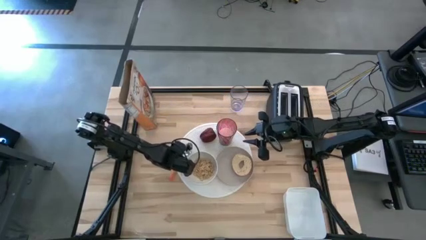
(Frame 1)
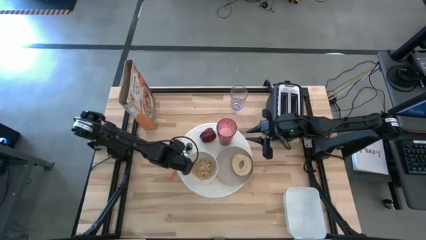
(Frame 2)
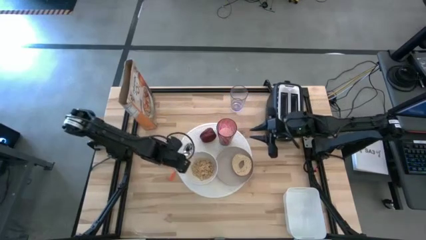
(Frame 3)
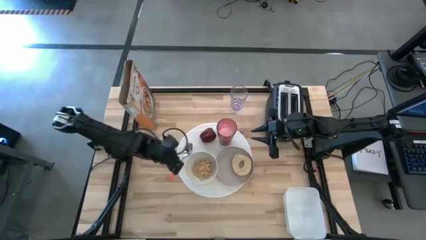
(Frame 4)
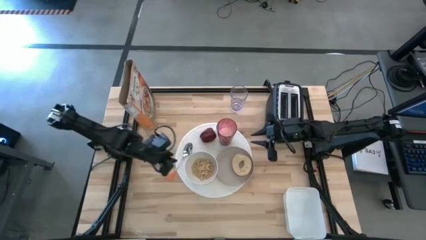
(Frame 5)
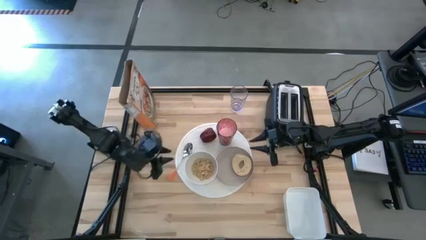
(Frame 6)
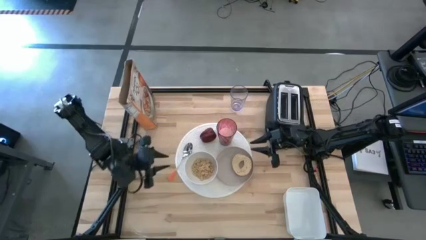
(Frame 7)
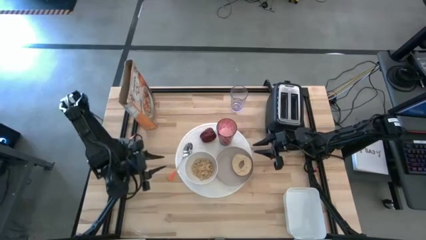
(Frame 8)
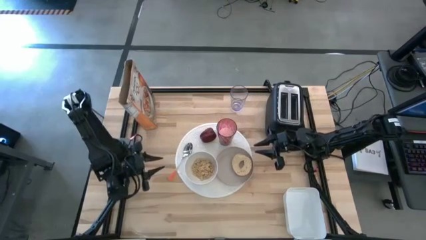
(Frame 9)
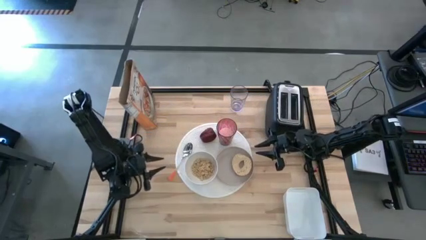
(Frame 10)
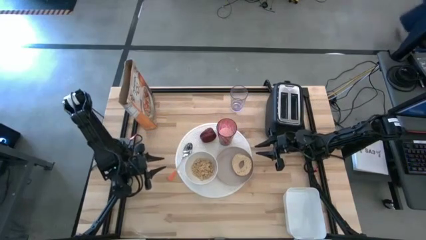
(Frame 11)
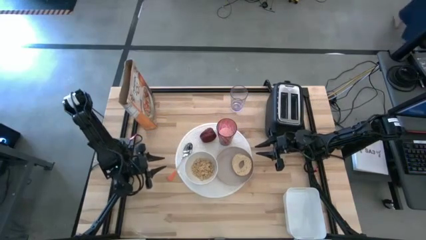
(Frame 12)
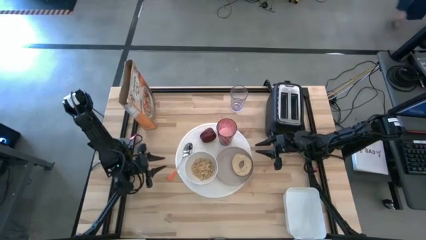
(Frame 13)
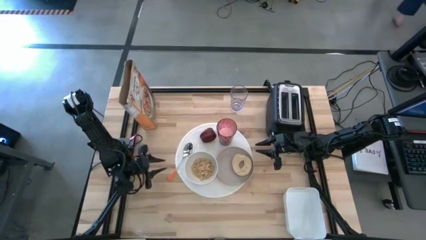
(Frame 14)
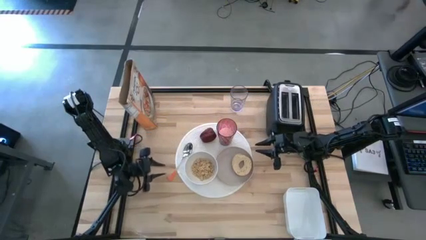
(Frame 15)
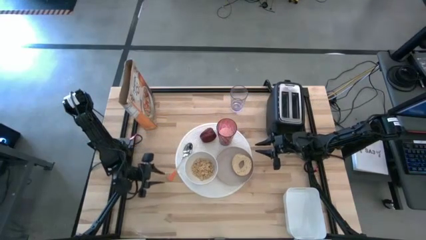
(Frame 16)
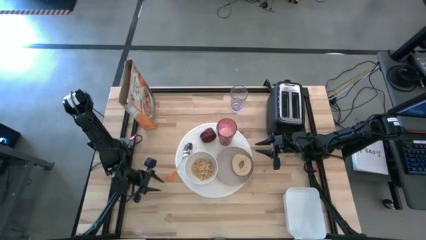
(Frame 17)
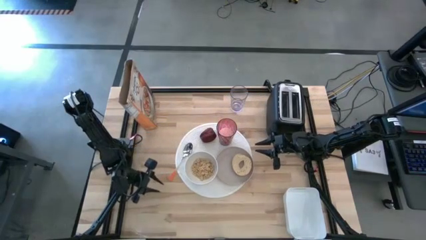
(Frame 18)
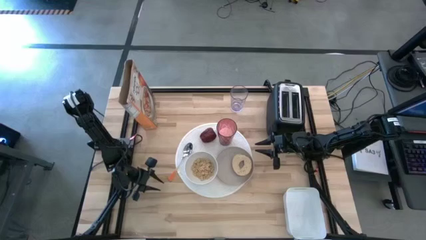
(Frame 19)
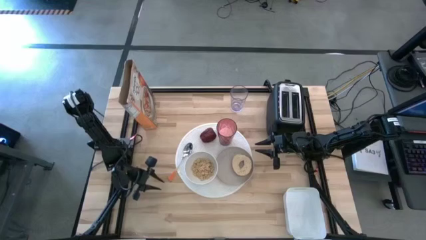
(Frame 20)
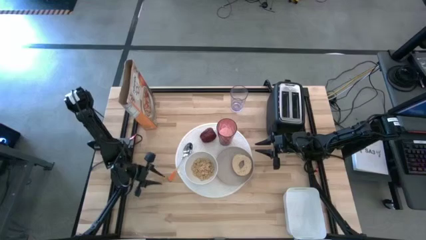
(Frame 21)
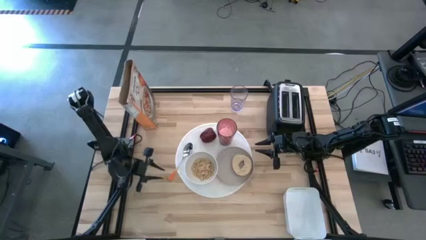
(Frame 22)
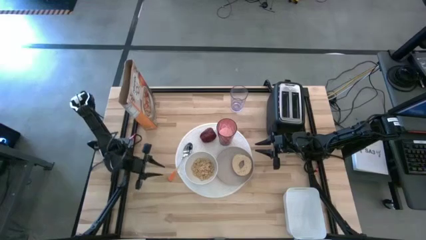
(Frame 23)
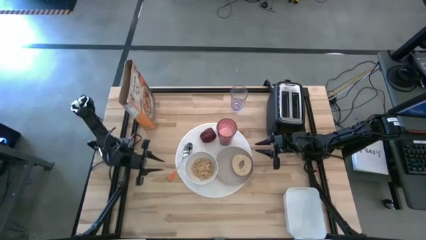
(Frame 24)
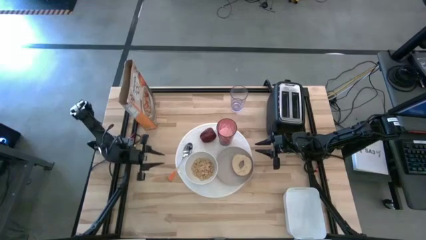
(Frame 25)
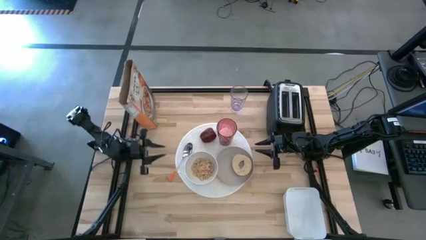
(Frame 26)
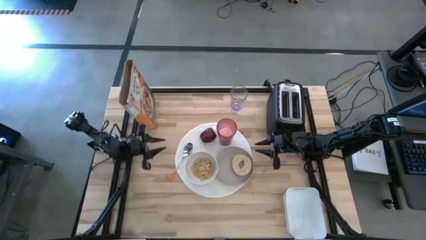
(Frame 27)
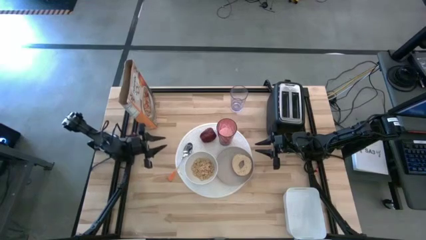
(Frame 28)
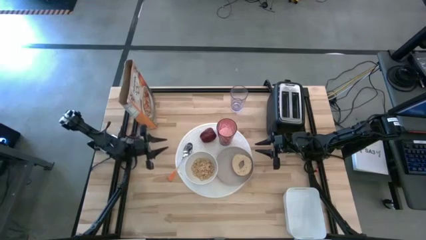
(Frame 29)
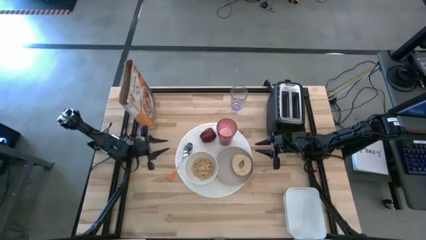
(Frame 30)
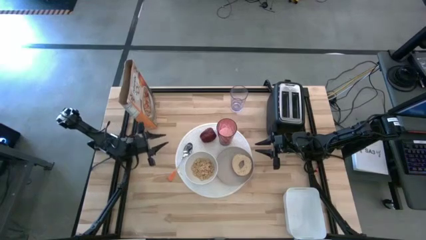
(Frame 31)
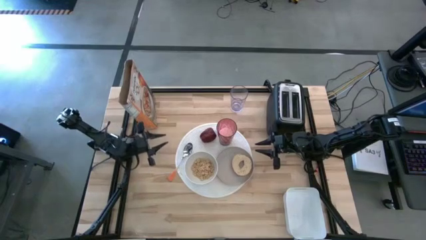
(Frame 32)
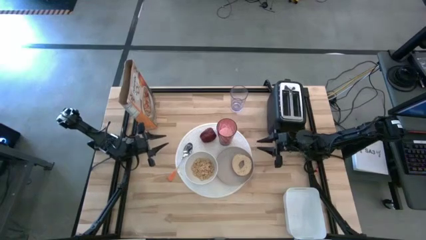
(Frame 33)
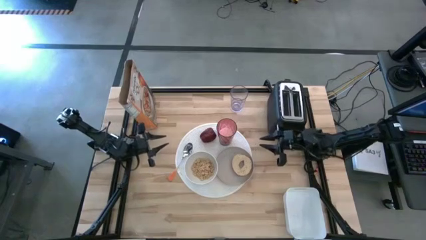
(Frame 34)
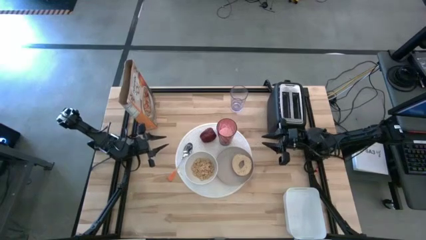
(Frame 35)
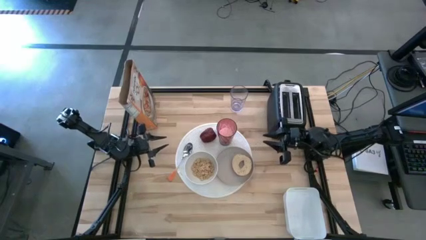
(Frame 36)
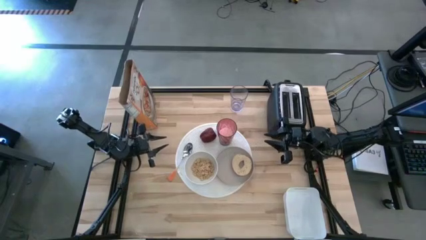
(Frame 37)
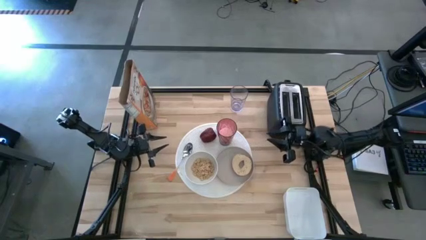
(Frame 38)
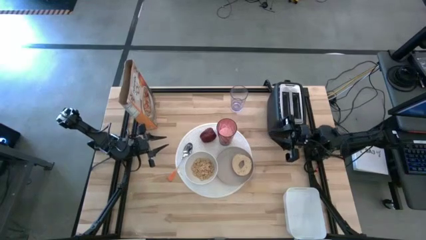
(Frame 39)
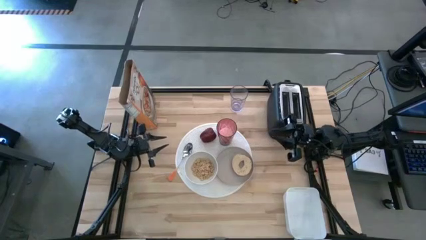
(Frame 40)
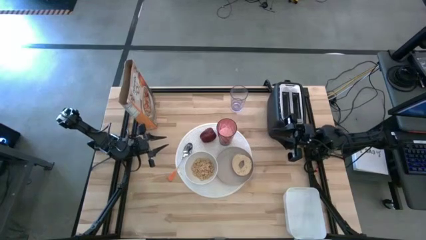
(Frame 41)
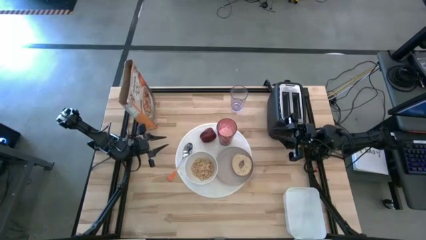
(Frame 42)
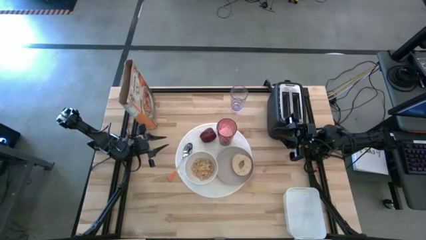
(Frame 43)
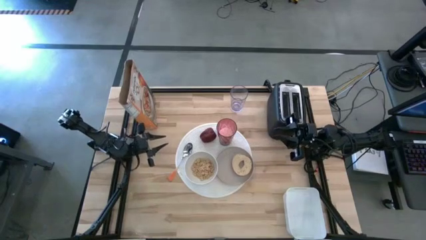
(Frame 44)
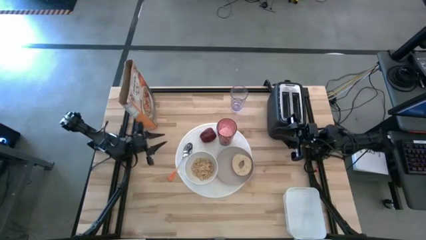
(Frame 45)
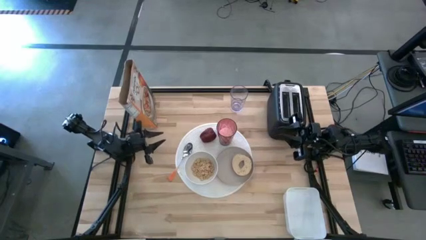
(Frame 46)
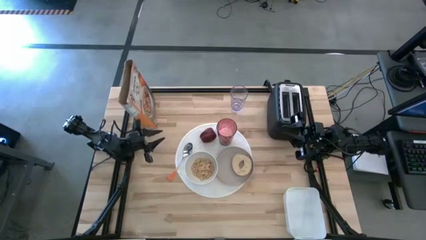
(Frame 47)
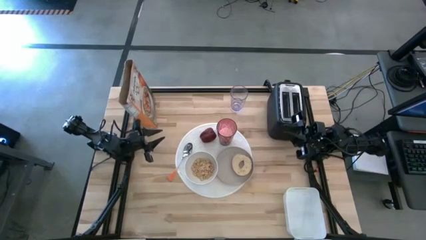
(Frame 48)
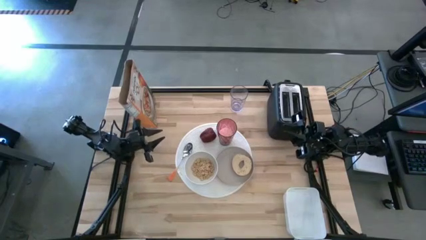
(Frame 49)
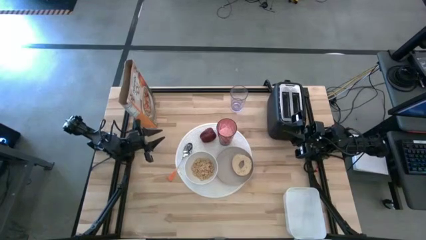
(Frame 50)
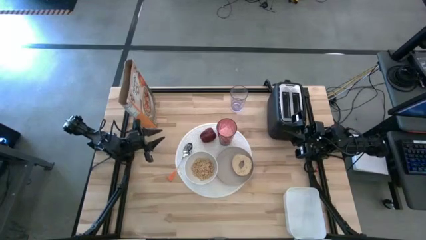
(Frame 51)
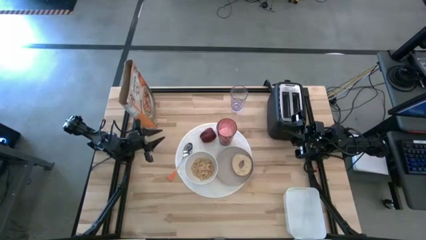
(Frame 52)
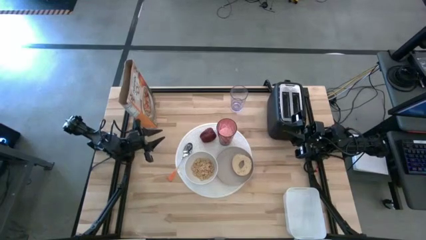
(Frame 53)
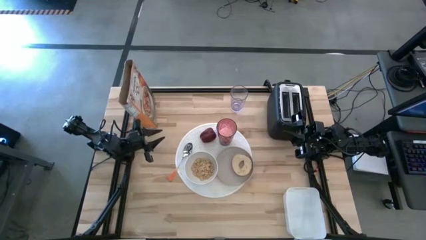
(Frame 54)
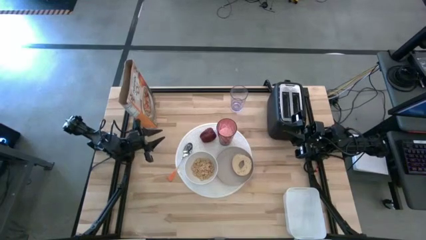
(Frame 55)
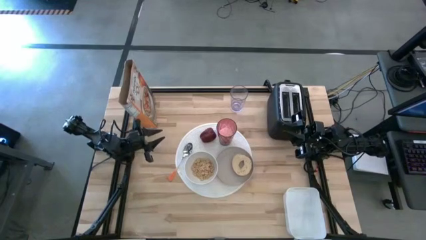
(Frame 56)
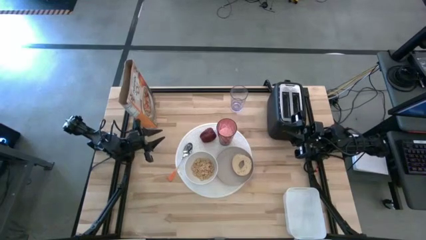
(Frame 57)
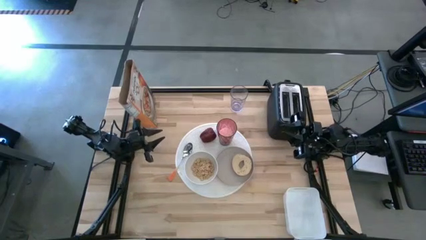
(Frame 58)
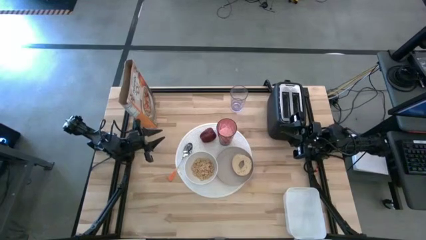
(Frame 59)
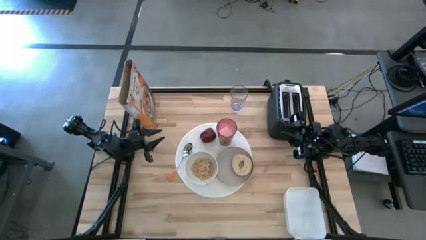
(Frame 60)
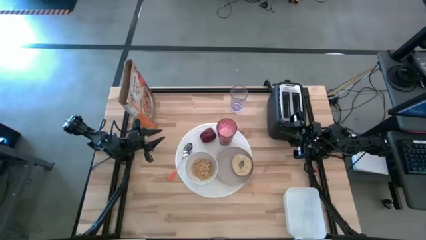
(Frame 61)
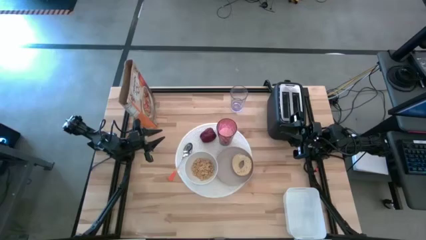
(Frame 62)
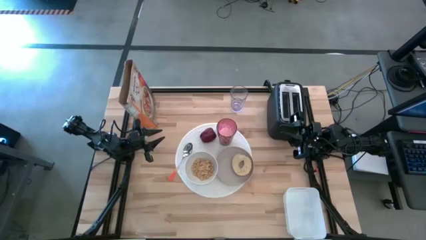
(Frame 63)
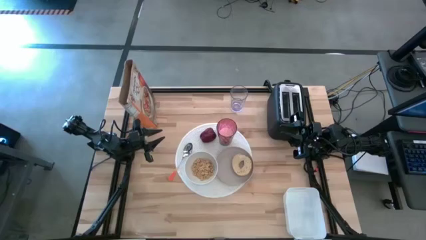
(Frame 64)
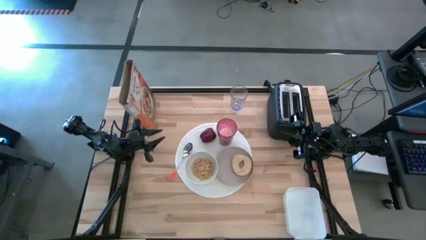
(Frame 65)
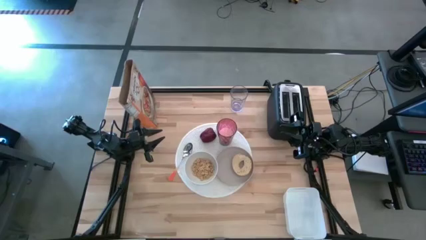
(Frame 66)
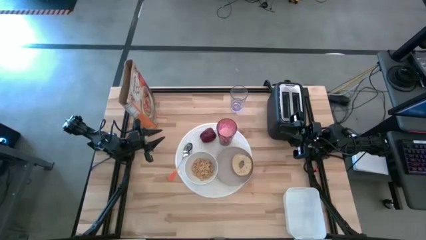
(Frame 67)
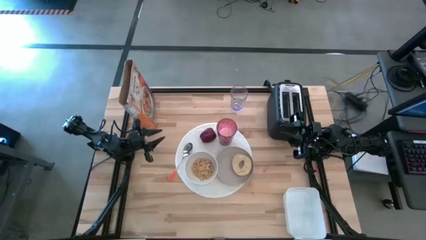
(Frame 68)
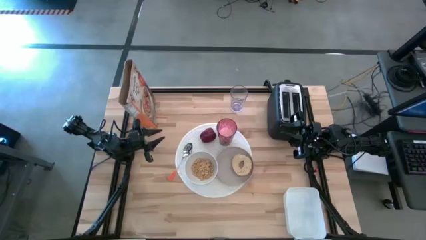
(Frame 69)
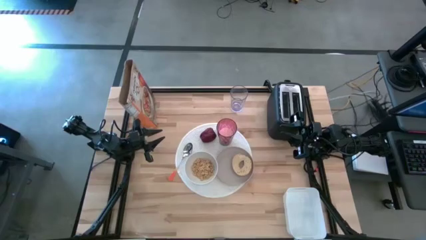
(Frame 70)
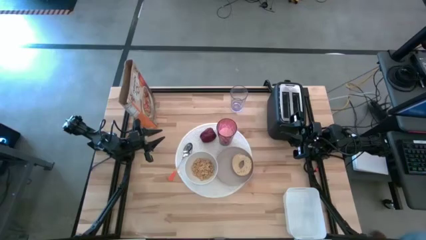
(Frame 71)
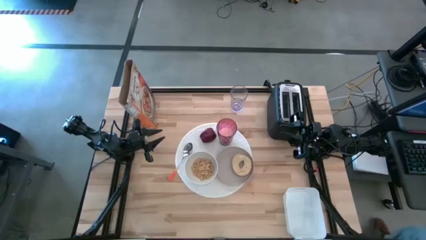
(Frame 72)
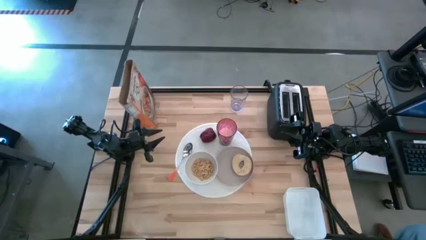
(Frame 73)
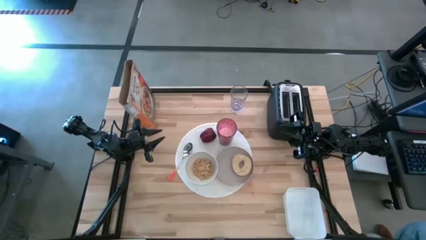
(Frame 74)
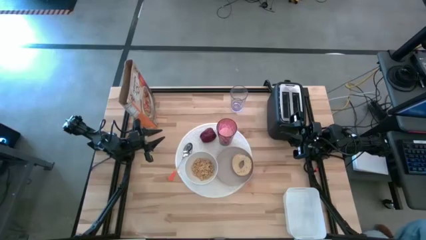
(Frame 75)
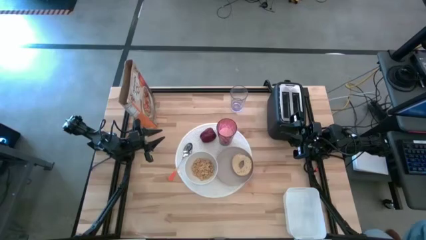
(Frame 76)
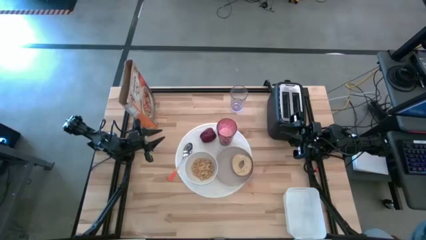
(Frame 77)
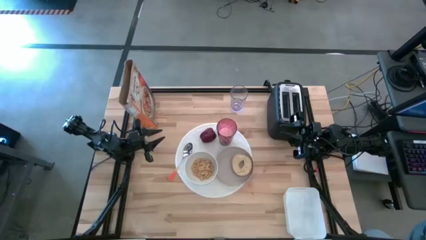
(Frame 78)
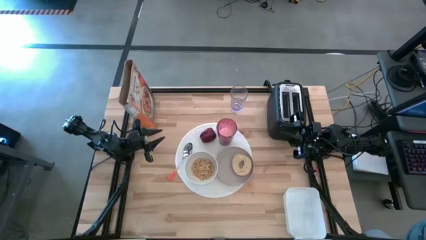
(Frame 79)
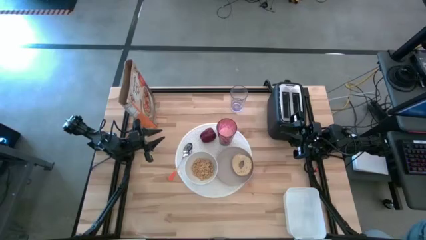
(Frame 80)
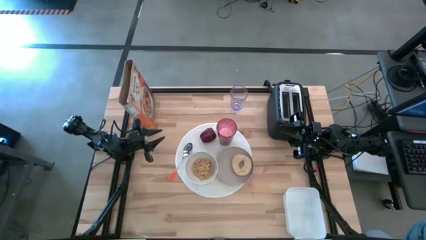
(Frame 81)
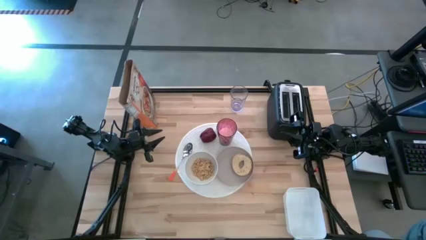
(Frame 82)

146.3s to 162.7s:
Task: Arrange a breakfast setting
Return to Home Position
